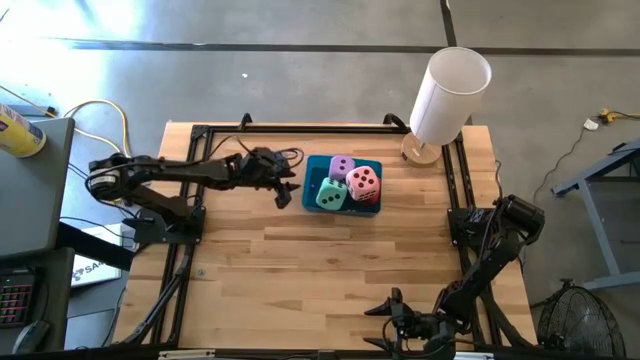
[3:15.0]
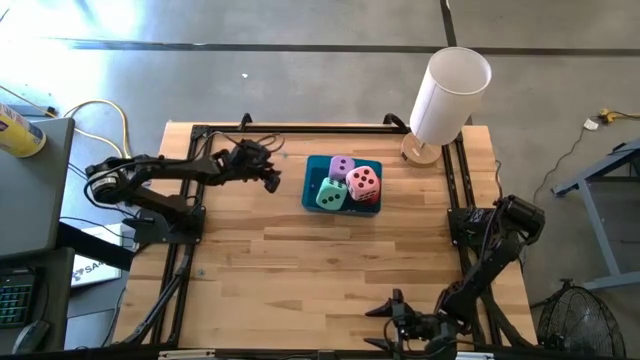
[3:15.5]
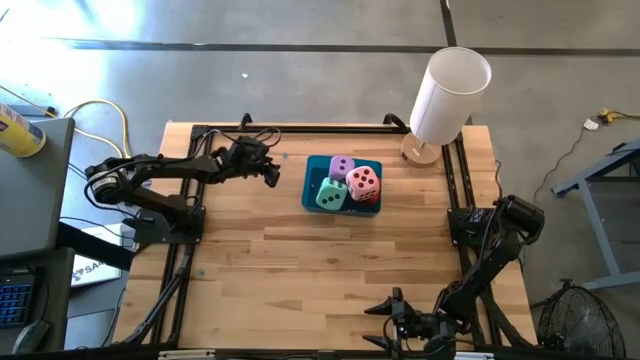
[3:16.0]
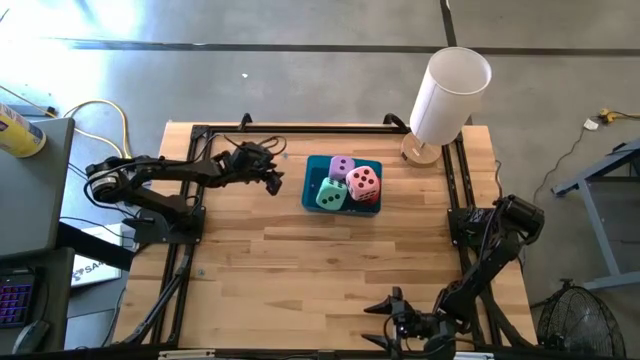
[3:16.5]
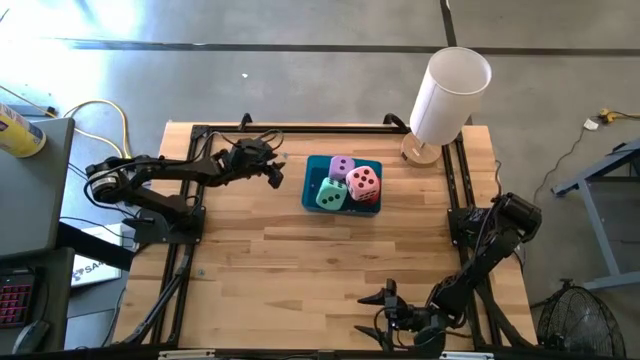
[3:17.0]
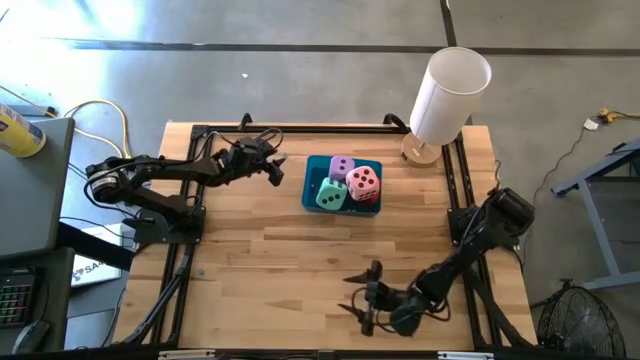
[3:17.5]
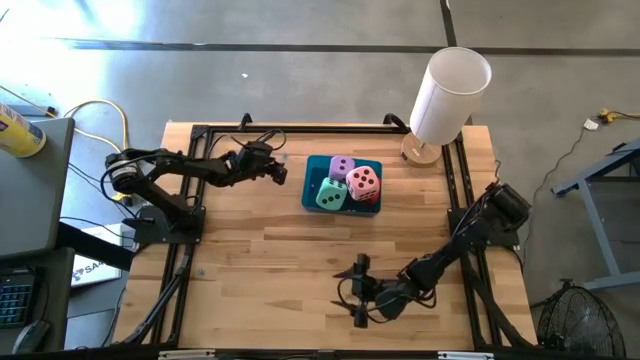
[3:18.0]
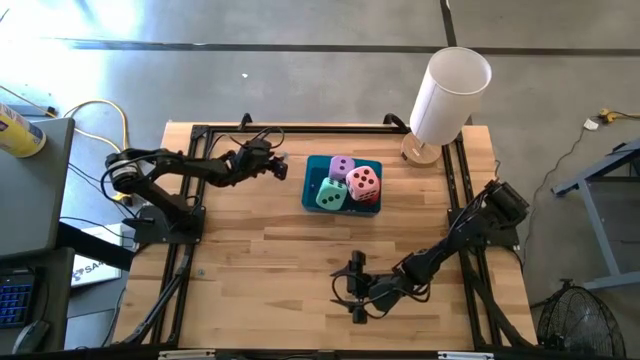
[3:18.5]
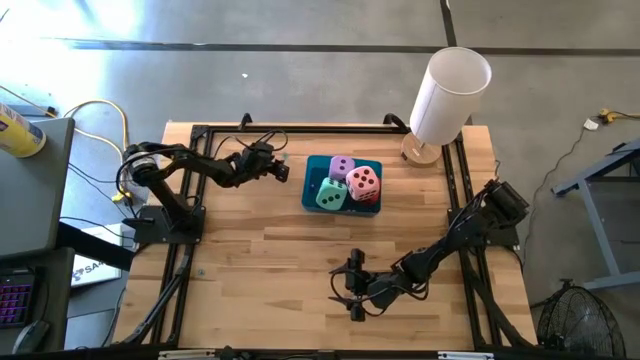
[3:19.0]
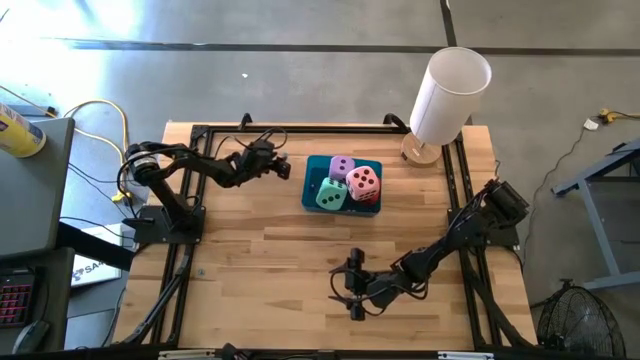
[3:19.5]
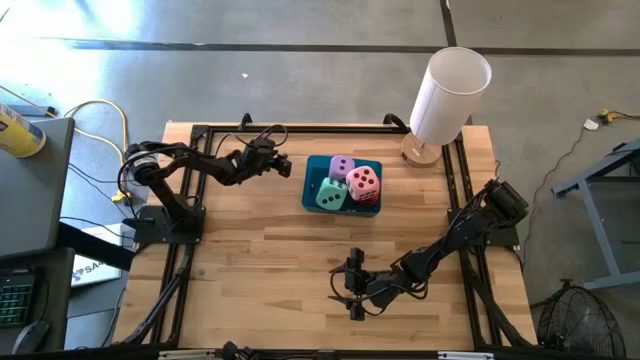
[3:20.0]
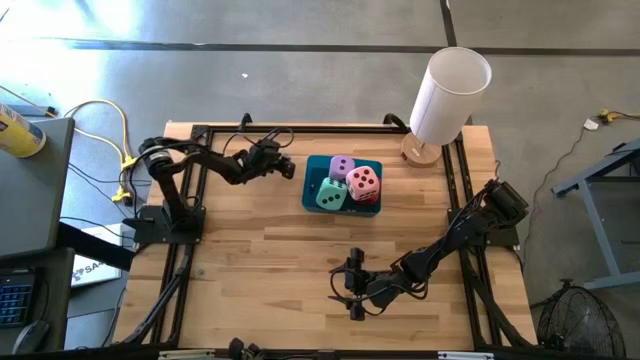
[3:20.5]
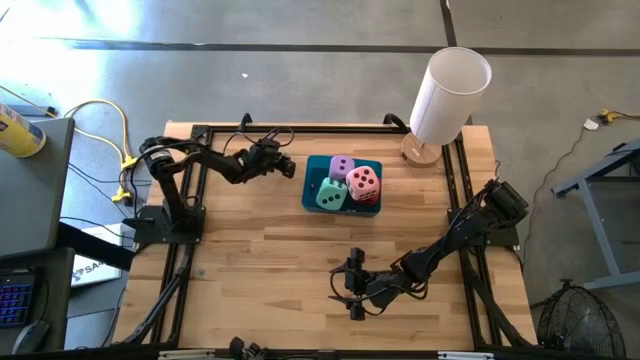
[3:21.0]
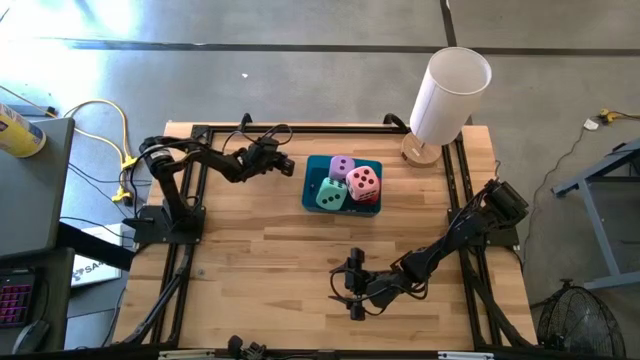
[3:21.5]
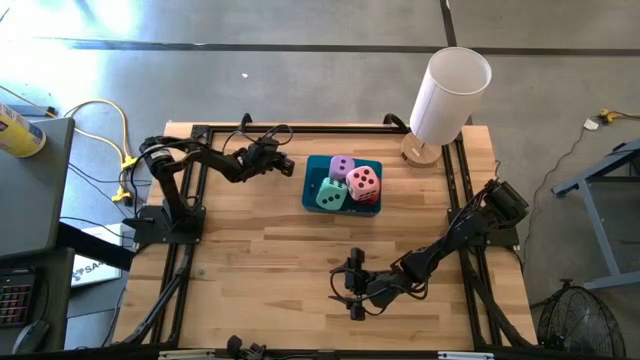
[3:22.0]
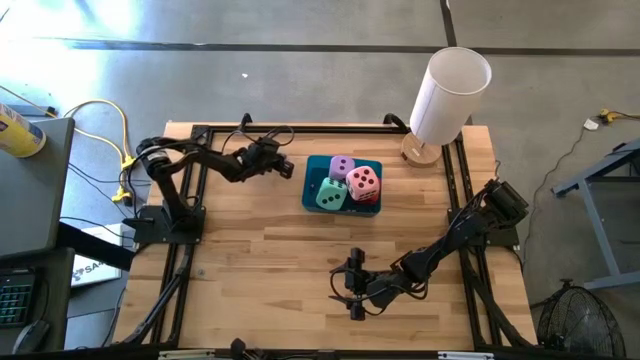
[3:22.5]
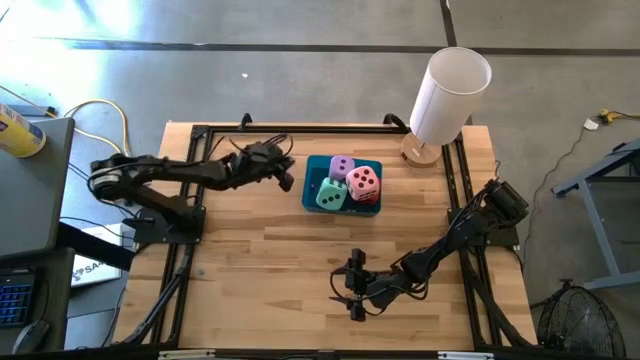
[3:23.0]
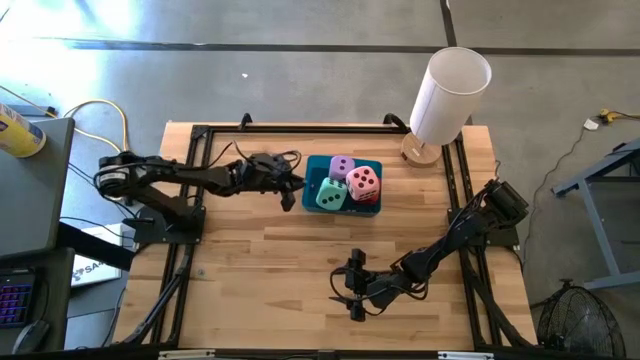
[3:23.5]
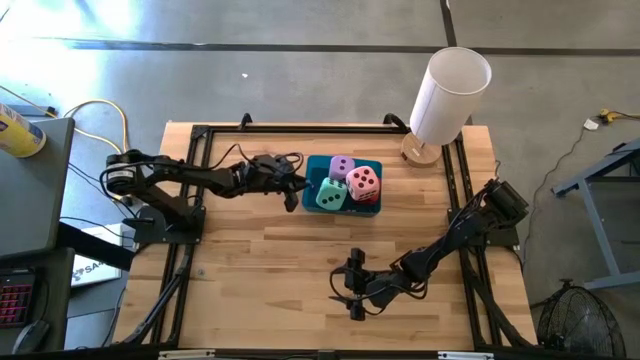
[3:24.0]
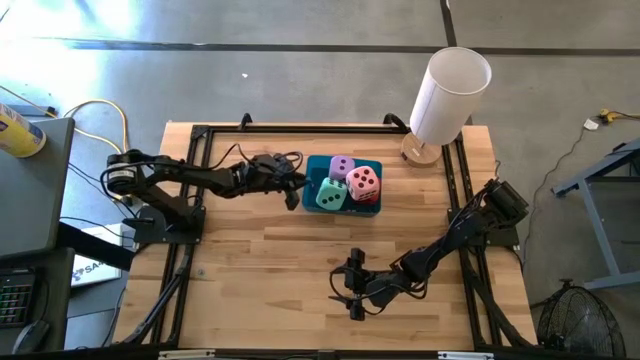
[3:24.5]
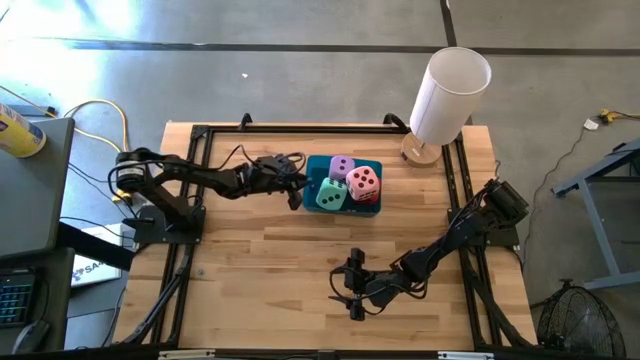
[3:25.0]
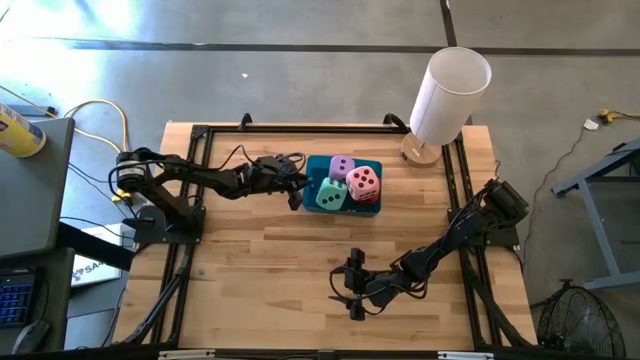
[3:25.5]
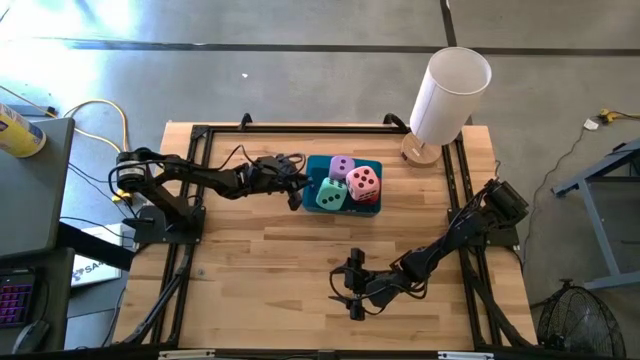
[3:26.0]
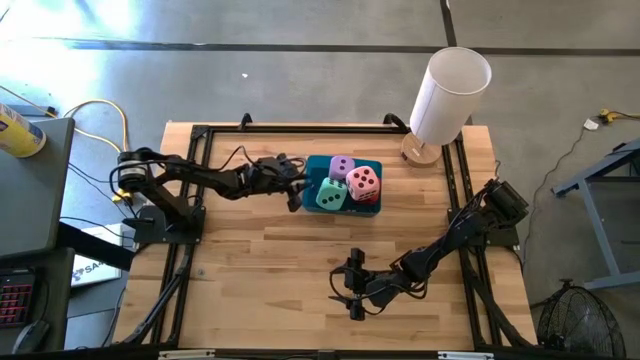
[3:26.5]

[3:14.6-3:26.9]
Task: Pick & Place Dice
Put the small blue dice into the blue bin

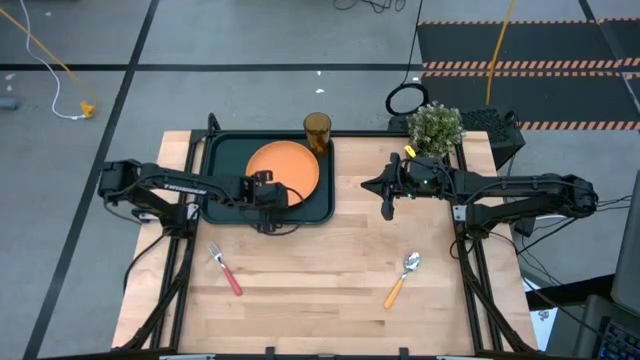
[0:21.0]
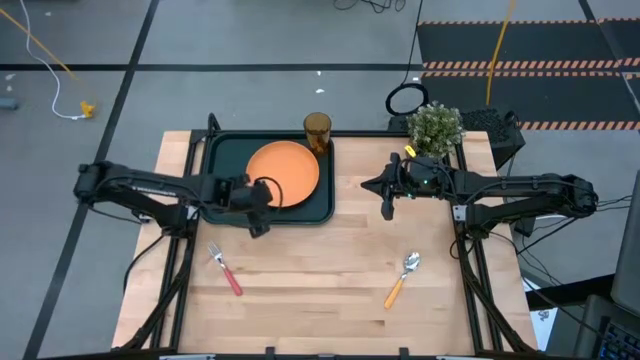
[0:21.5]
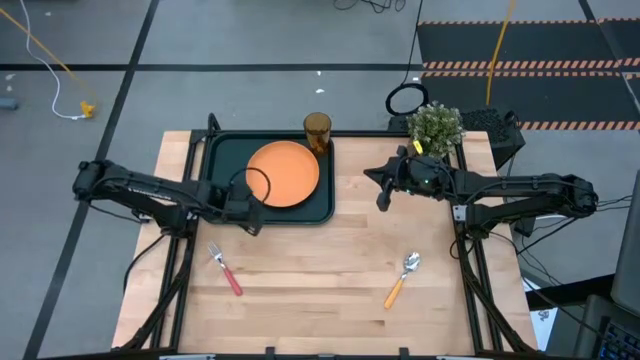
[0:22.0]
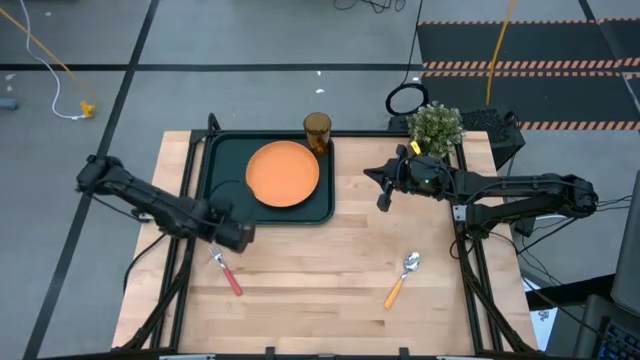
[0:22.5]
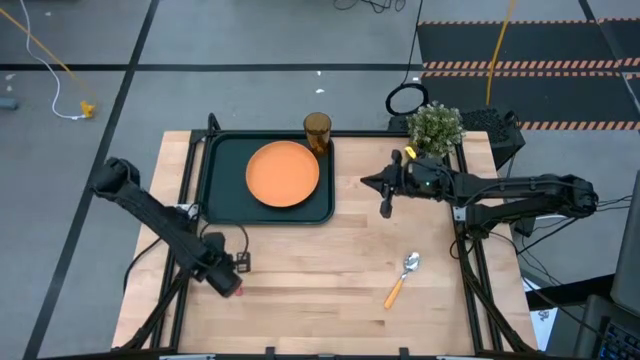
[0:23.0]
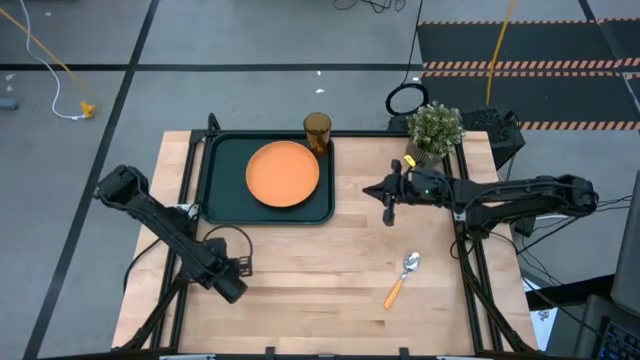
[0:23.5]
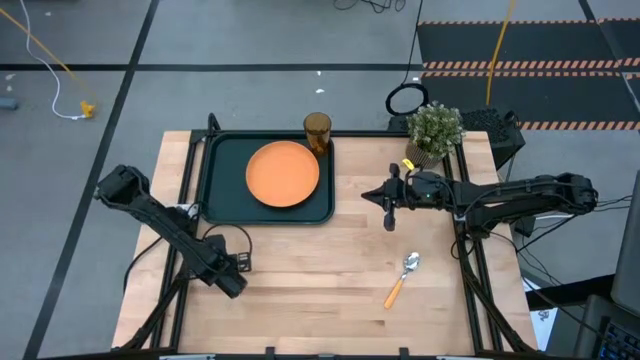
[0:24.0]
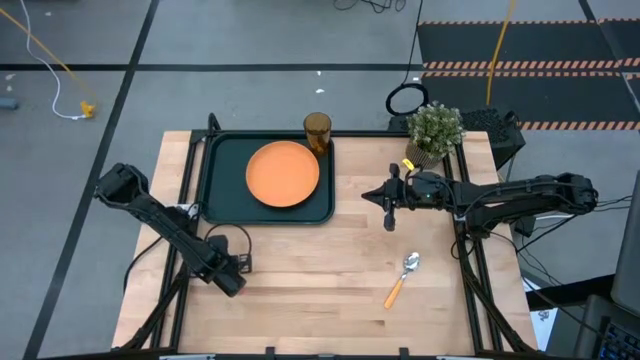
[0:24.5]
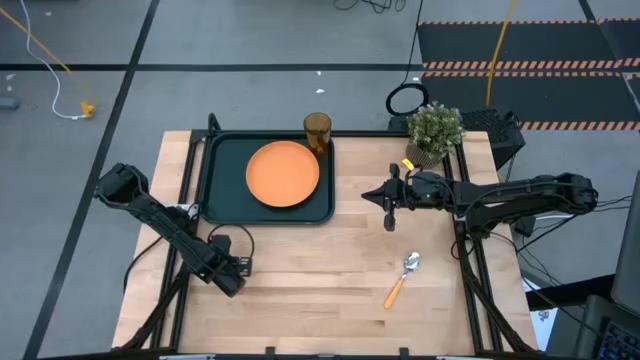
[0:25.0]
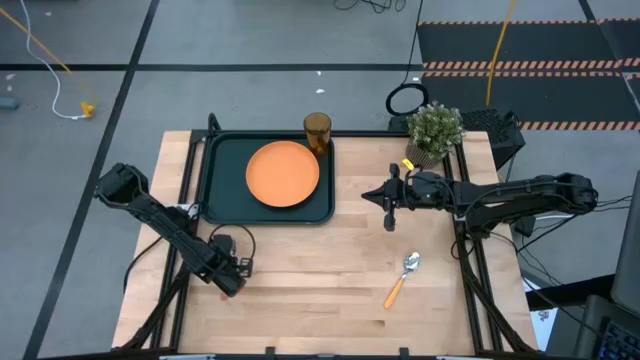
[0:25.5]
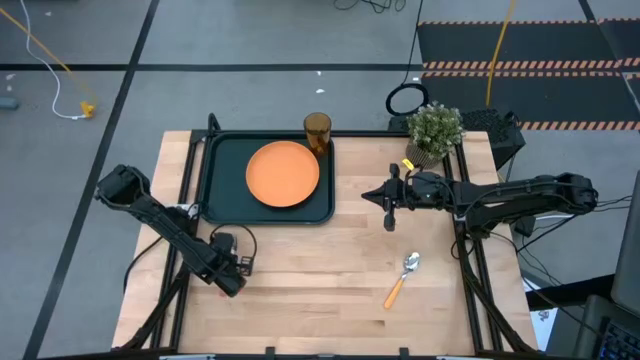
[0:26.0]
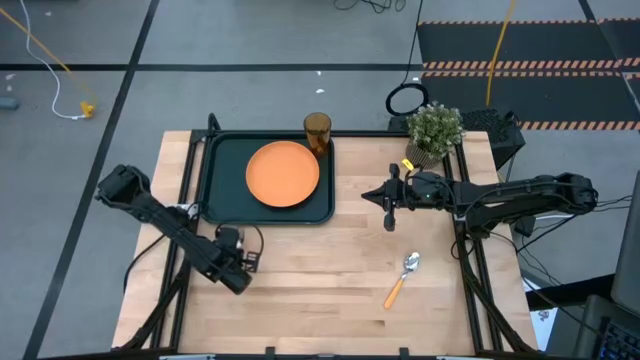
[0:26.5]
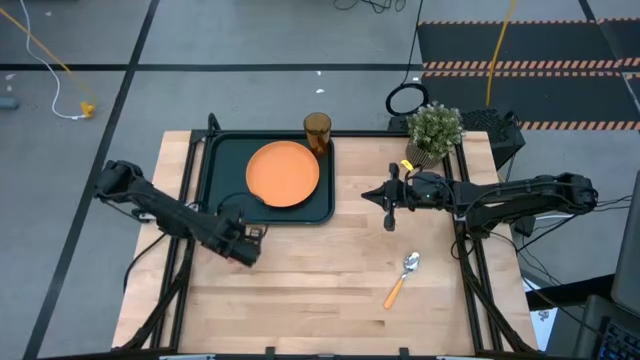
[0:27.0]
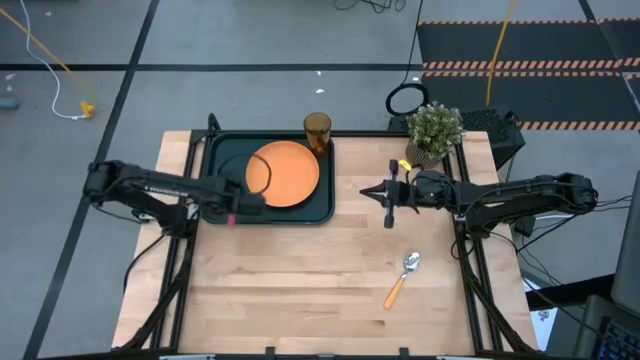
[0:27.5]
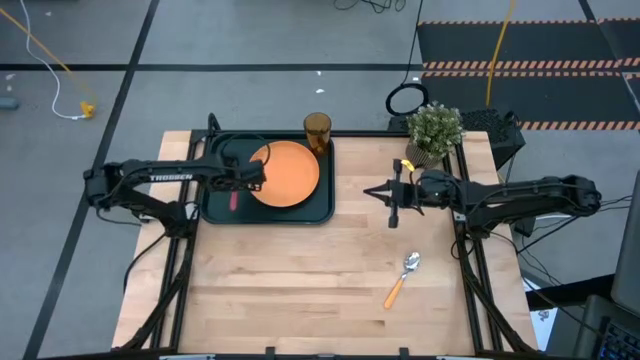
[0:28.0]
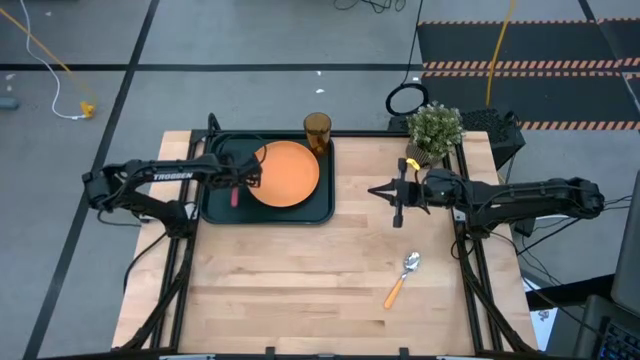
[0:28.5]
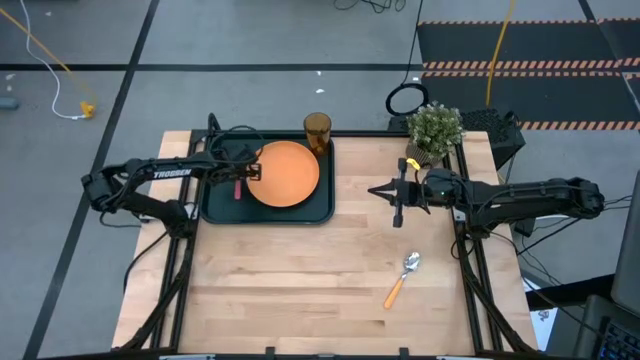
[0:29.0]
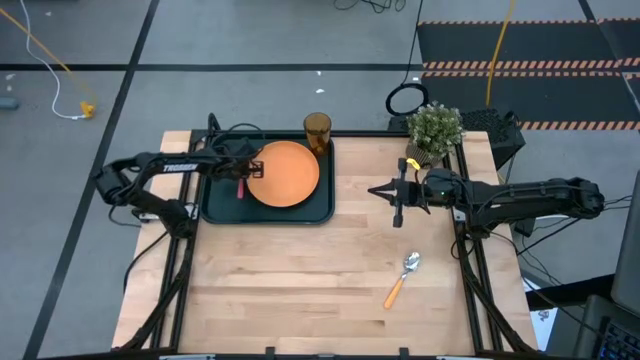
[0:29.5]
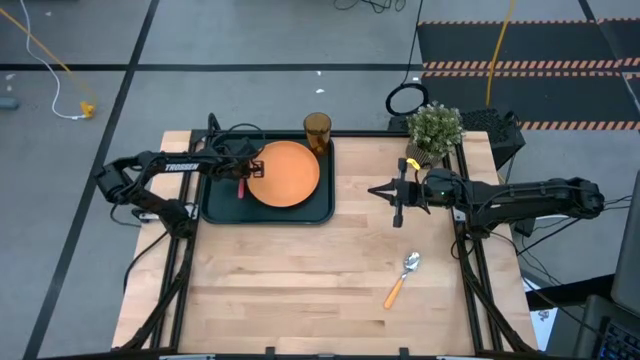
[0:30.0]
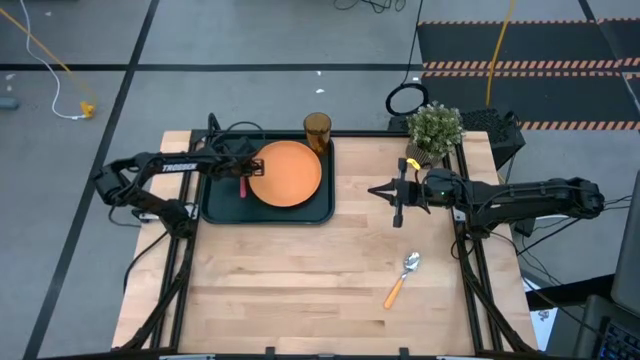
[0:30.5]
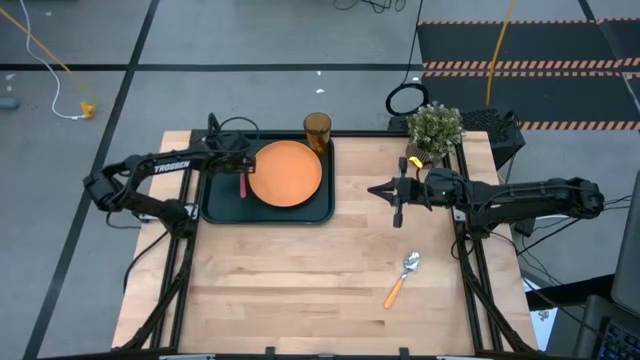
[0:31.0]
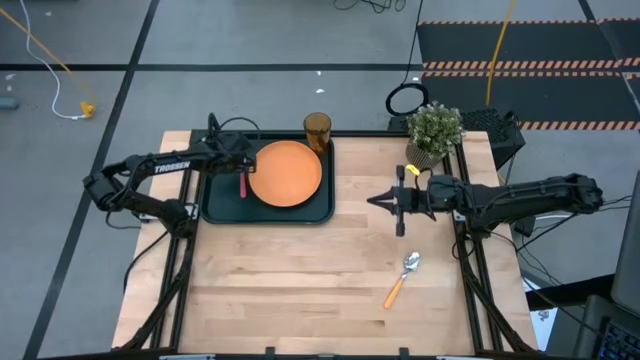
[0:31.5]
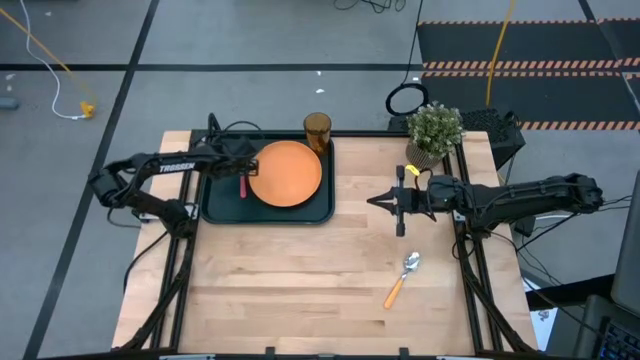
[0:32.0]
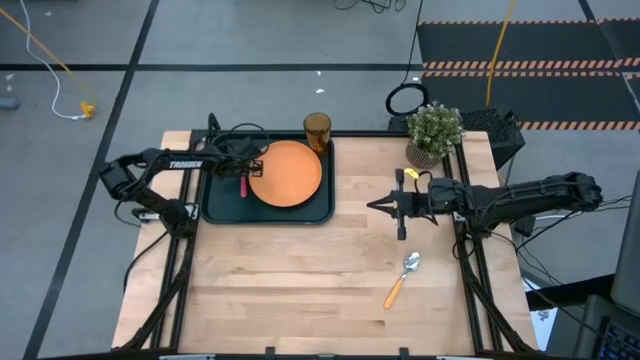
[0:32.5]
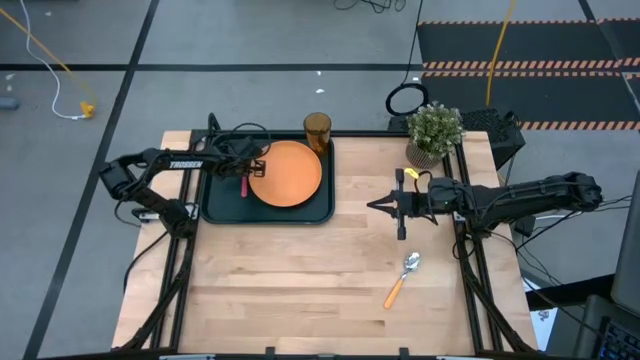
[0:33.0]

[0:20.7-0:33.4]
Task: Pick and place plate/cup/fork/spoon on tray
Put the pink fork on the black tray to the left of the orange plate
